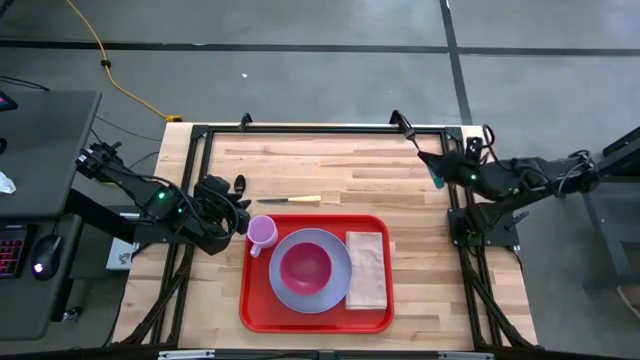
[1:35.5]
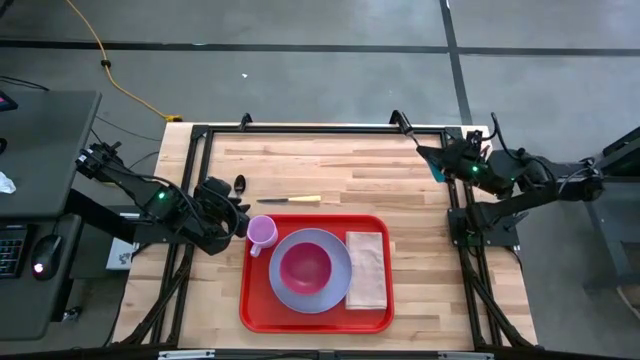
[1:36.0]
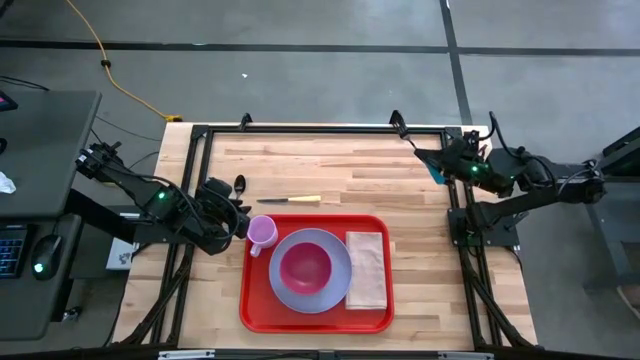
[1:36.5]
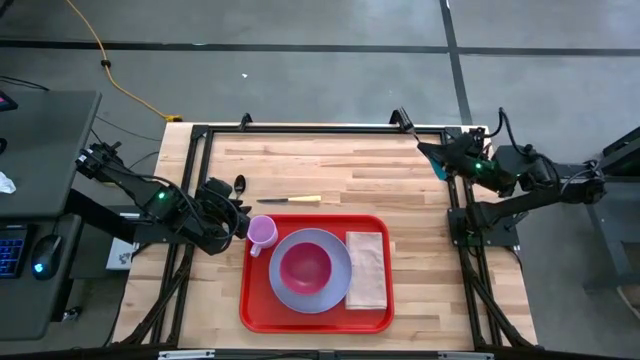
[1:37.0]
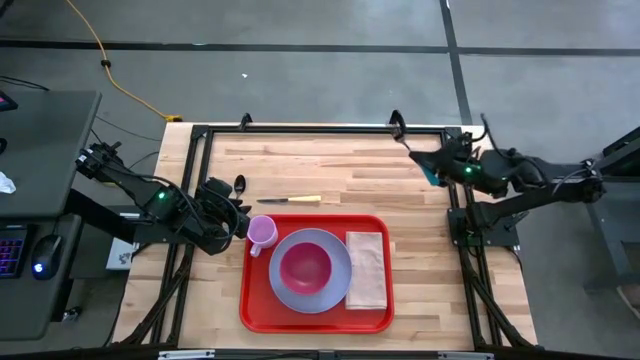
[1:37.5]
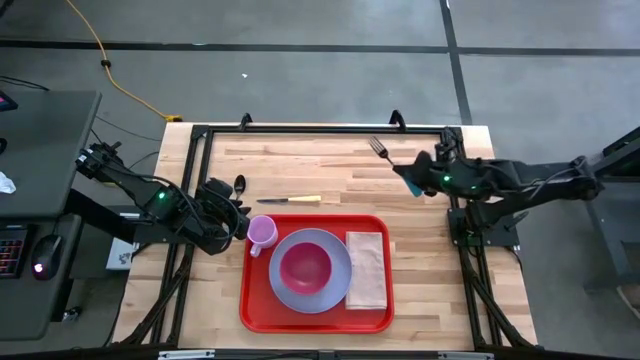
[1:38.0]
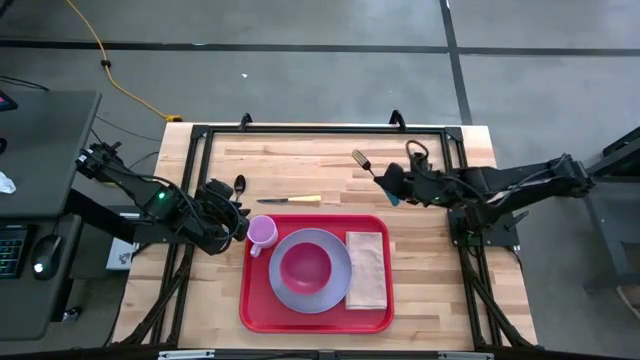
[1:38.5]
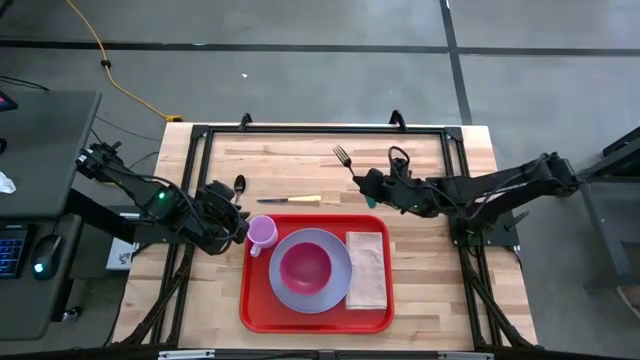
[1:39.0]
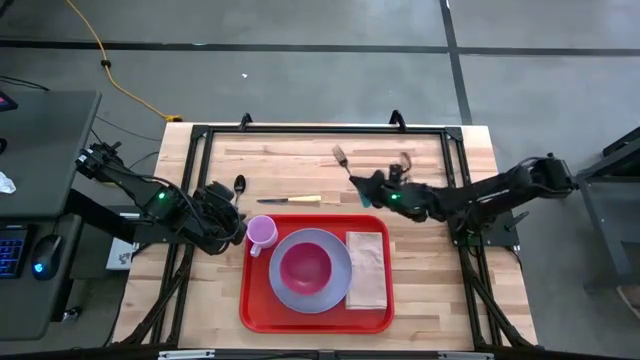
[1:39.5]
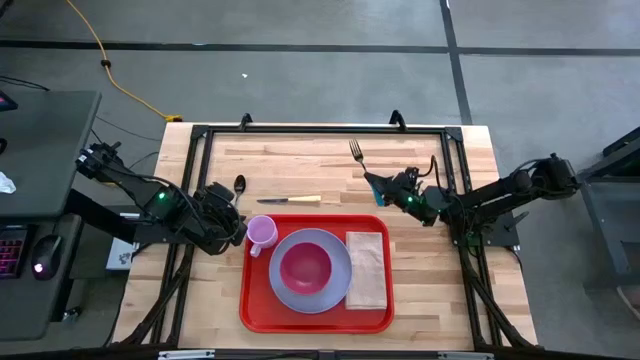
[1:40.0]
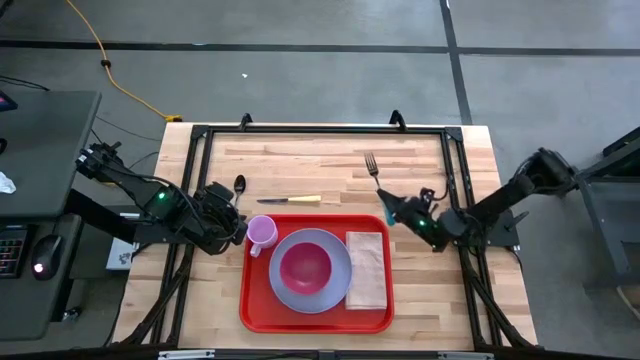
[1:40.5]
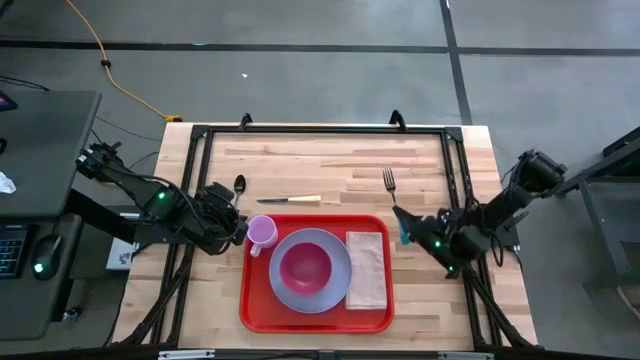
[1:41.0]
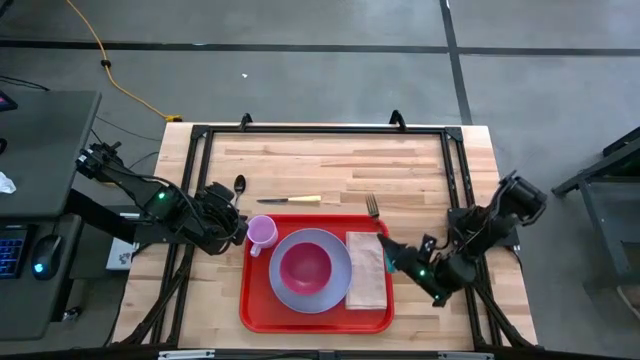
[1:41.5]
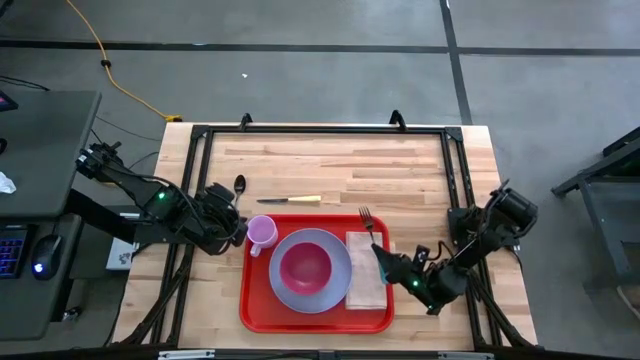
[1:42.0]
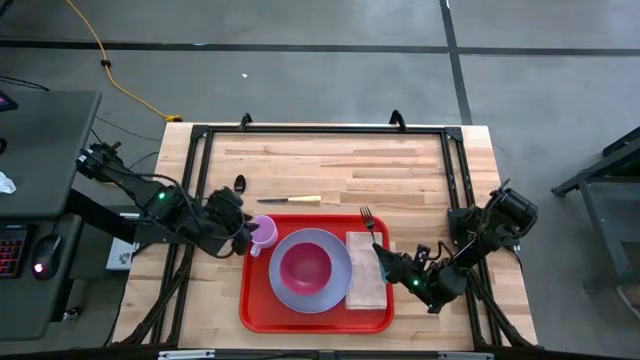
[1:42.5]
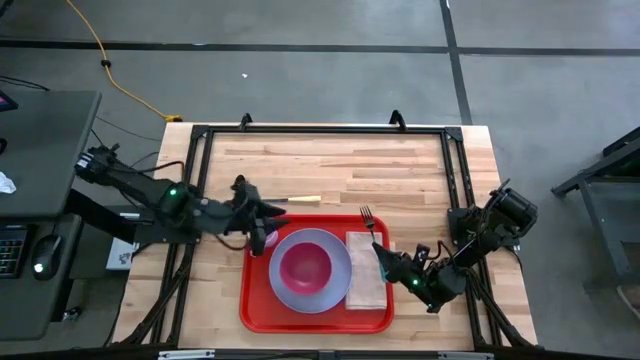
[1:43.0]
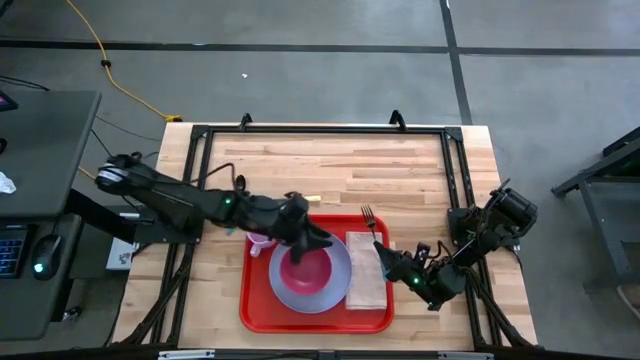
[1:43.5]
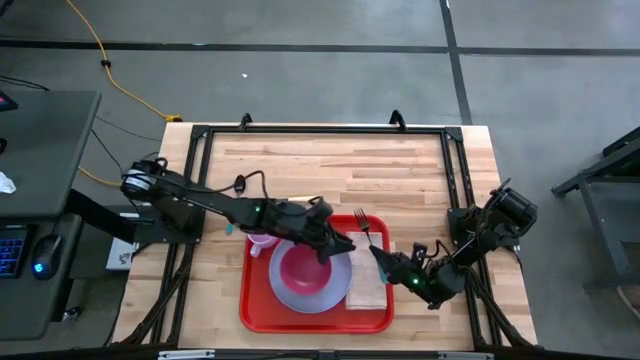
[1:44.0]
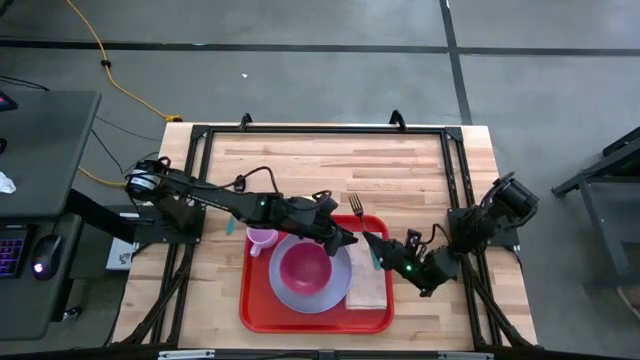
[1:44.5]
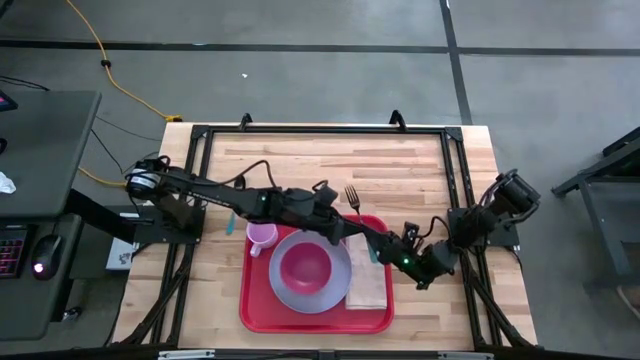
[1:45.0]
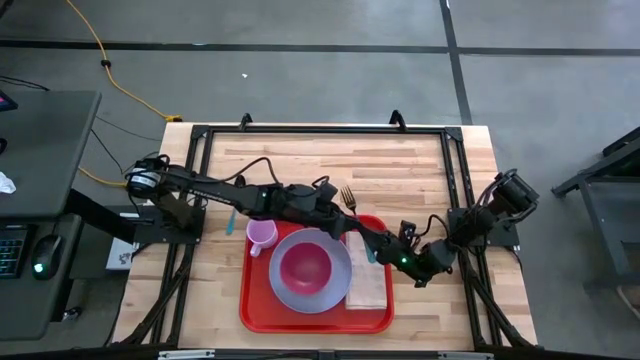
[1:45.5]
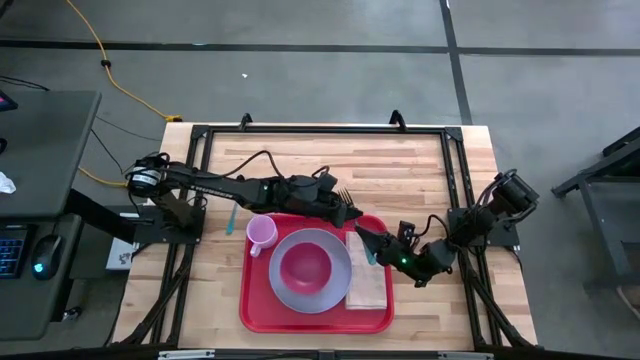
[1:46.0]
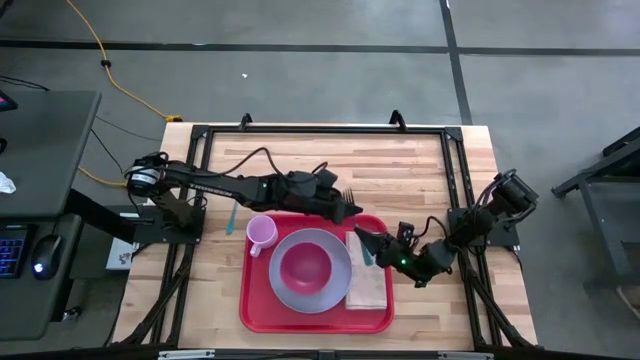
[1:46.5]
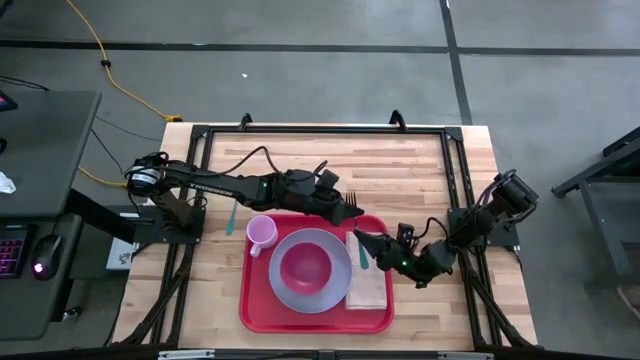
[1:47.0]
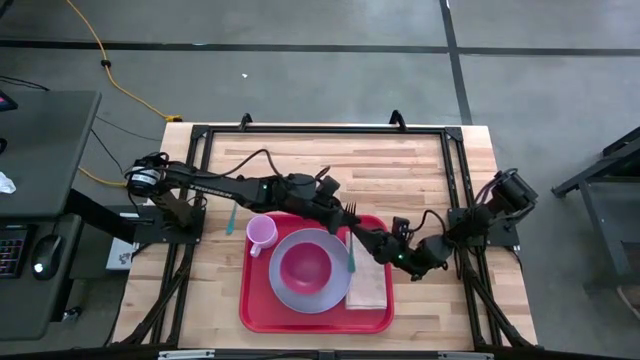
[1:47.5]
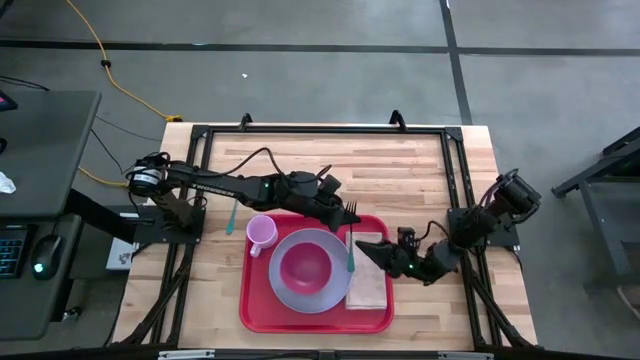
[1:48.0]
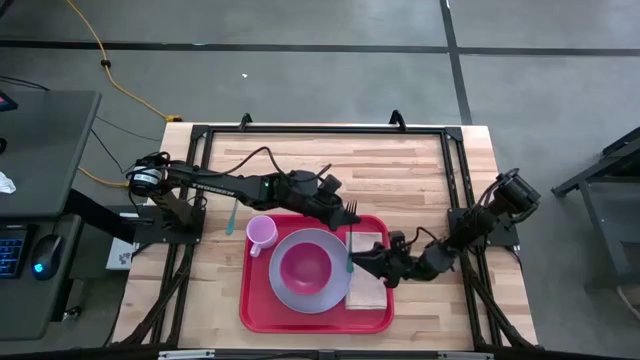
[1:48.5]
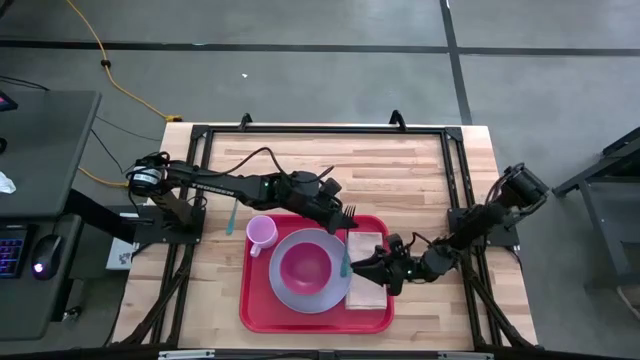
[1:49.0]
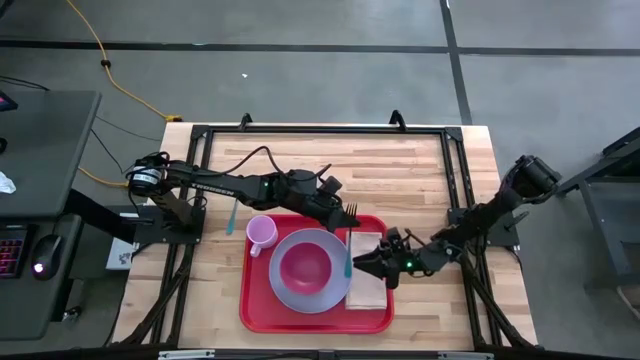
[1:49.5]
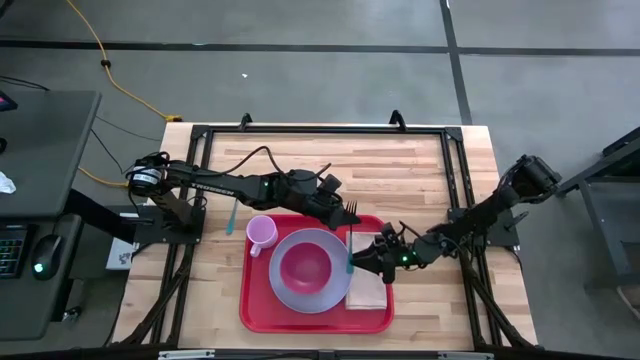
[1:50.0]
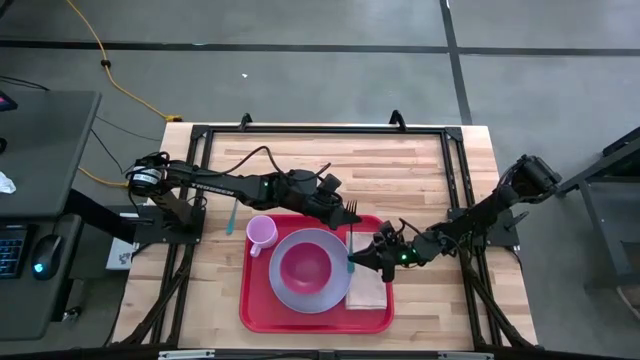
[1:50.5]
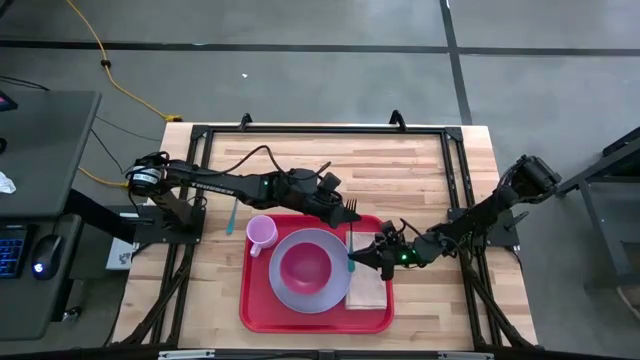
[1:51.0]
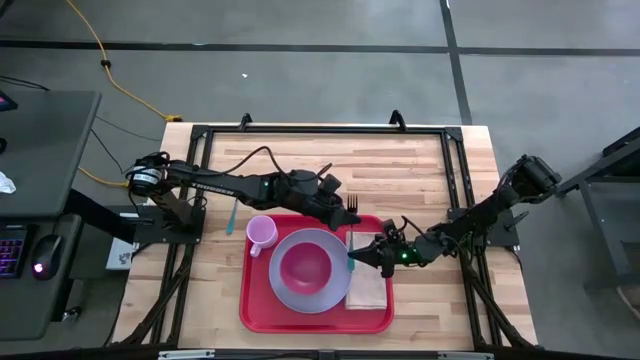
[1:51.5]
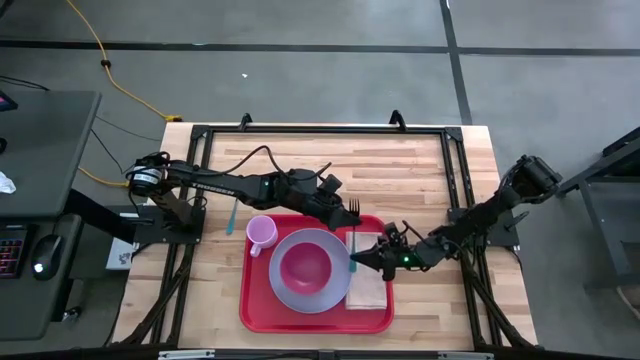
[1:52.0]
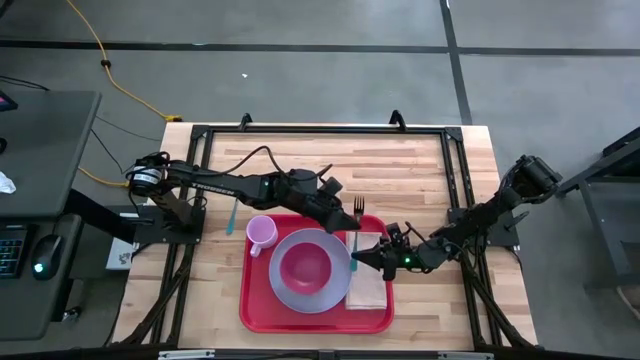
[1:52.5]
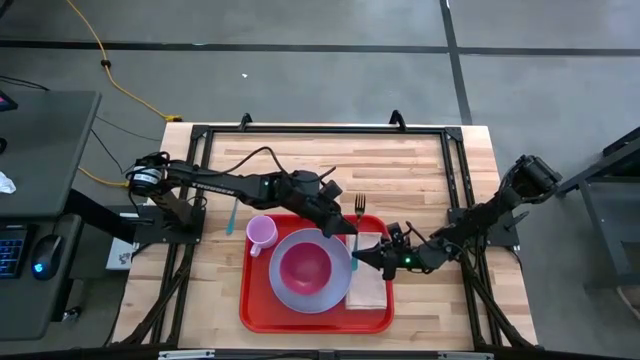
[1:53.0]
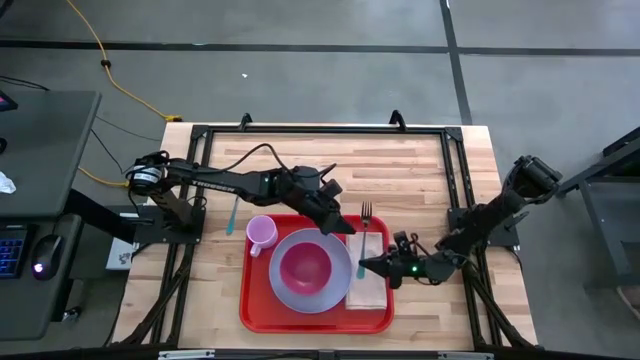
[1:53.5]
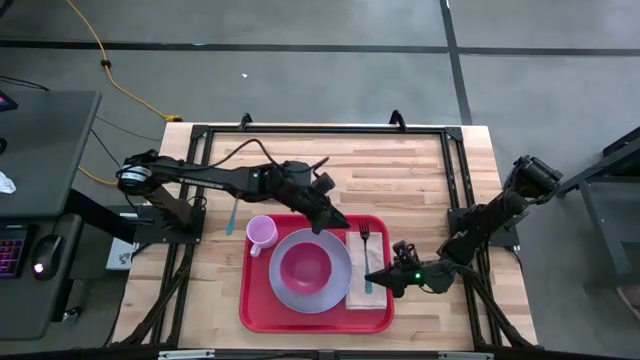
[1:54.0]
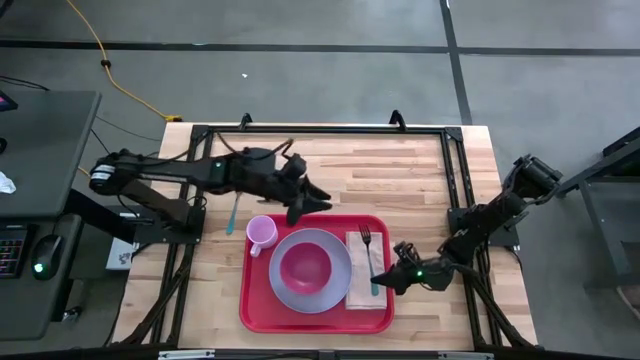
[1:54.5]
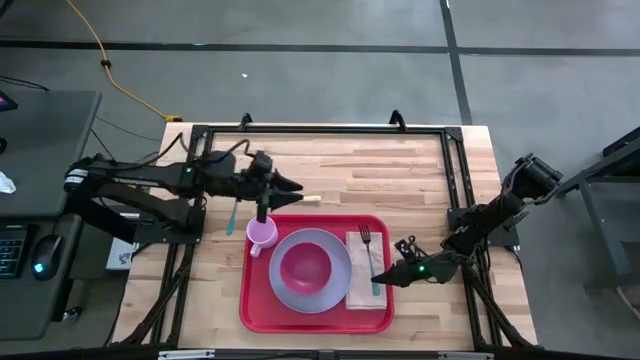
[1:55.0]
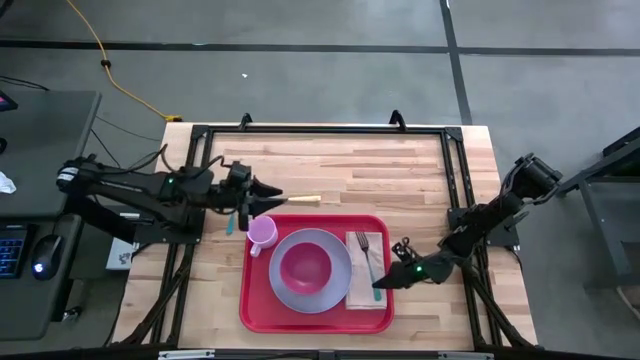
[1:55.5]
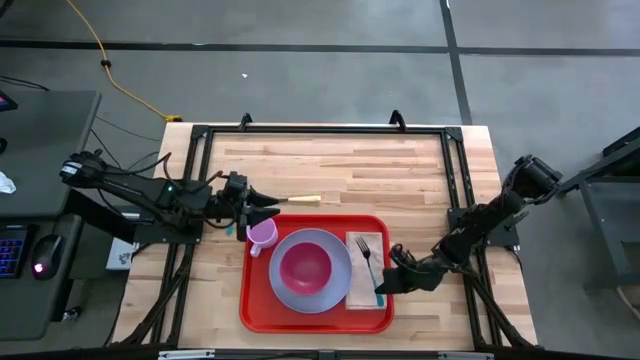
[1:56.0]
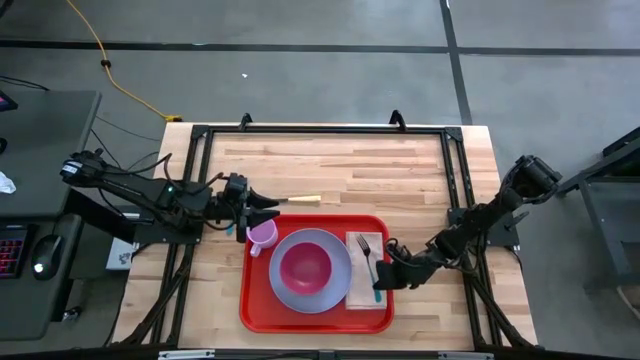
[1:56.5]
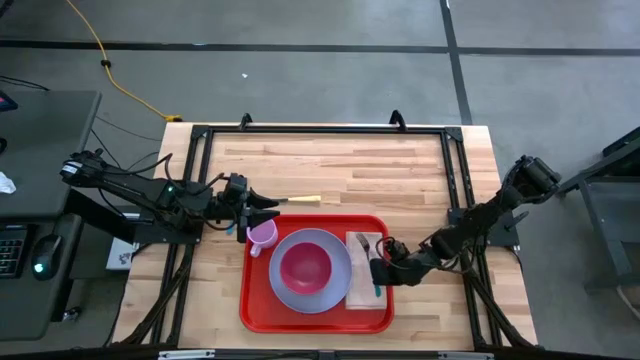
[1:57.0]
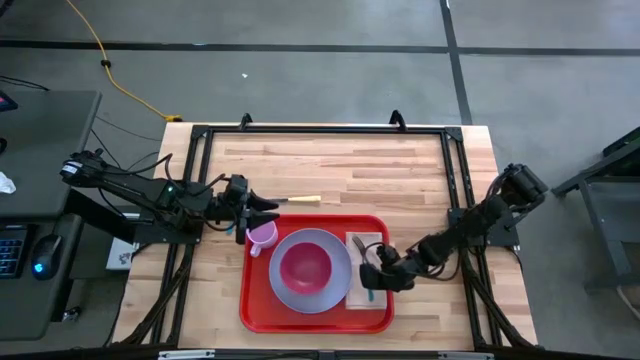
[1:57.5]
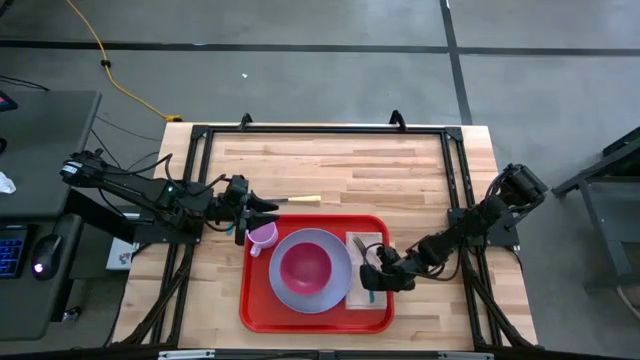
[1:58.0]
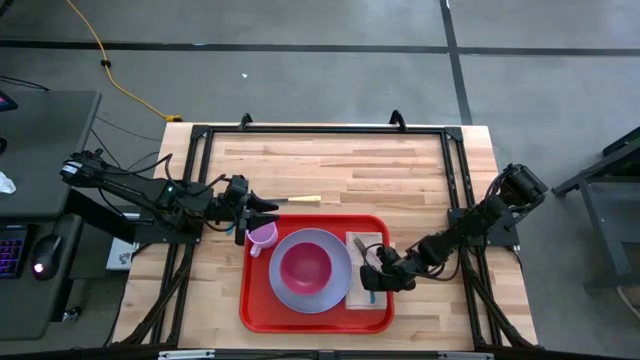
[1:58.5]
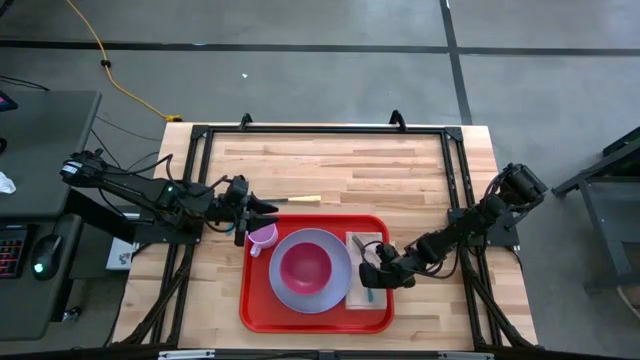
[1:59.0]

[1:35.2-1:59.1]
Task: Set up tray
Put the blue fork on the brown napkin
